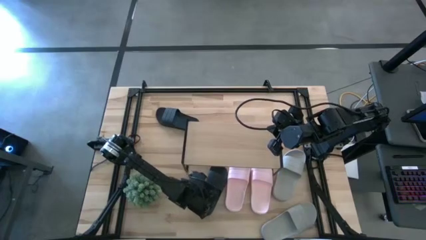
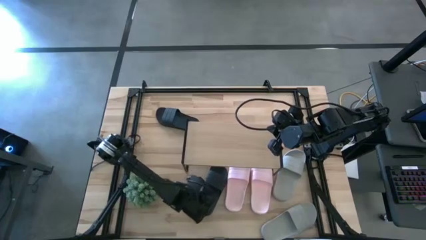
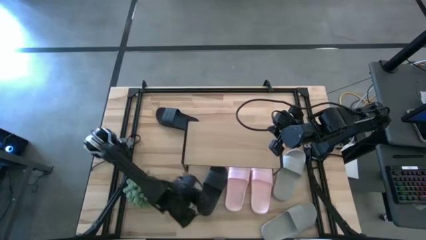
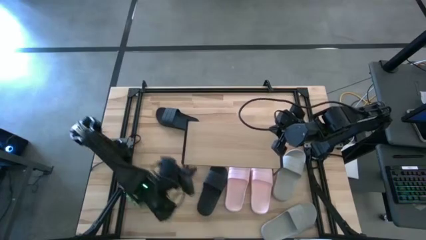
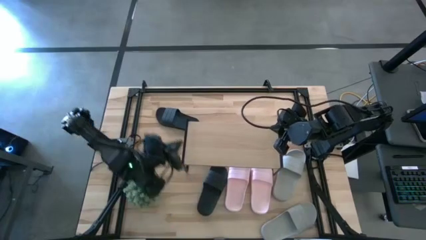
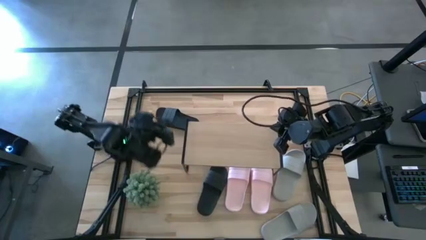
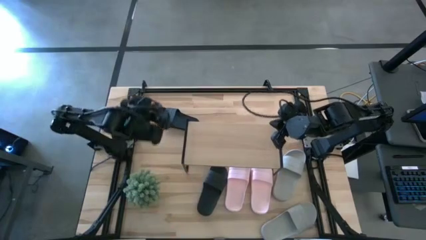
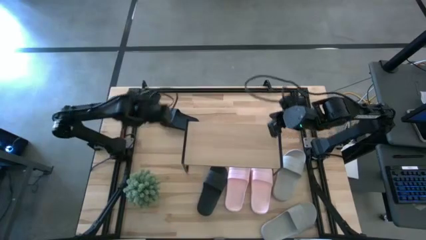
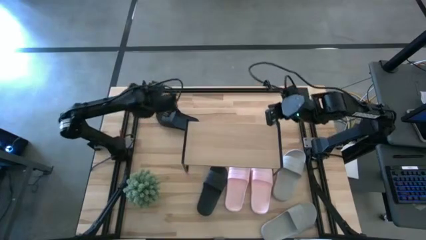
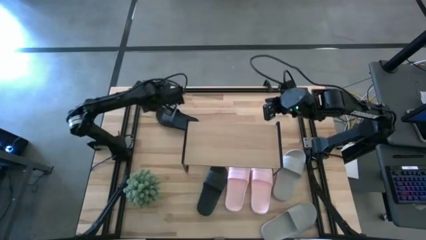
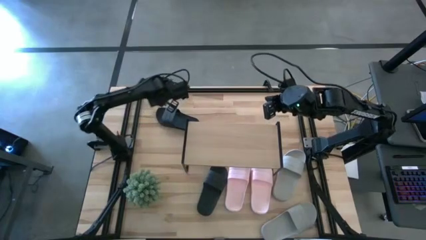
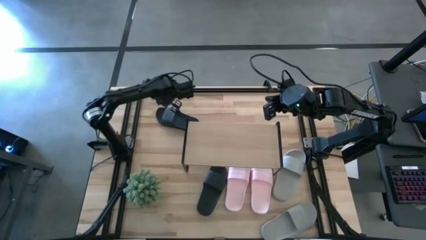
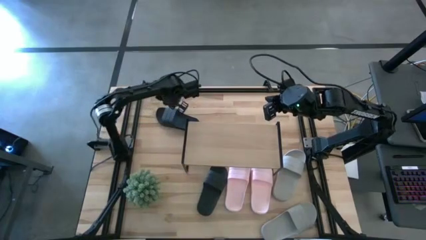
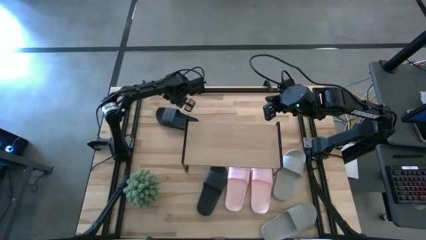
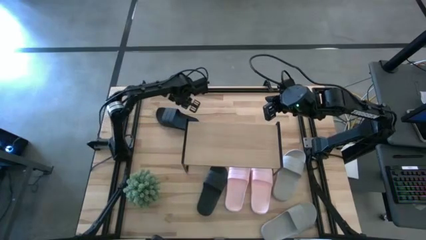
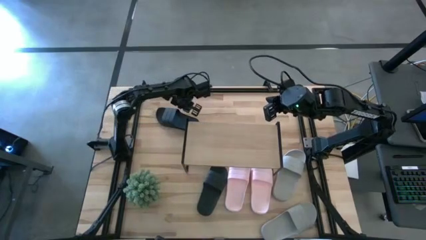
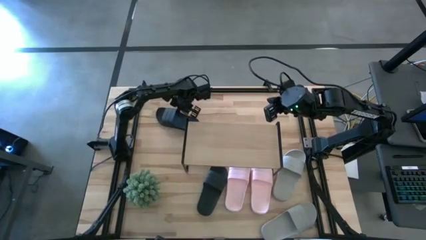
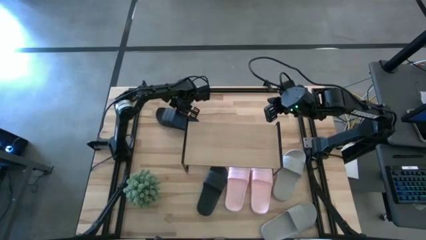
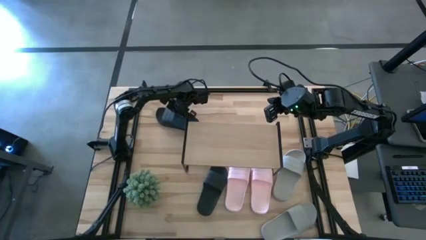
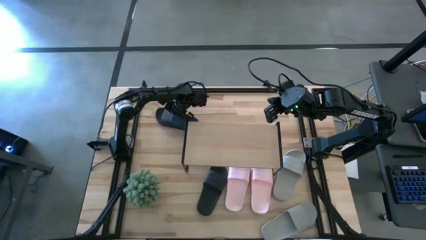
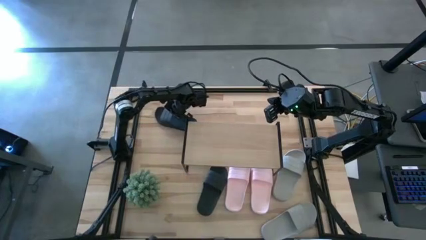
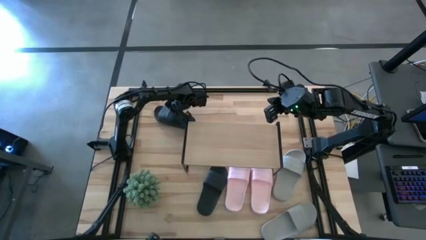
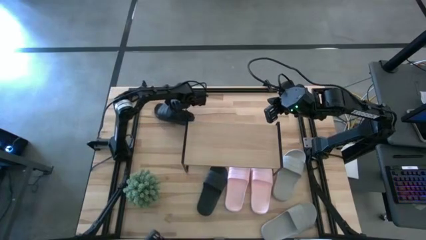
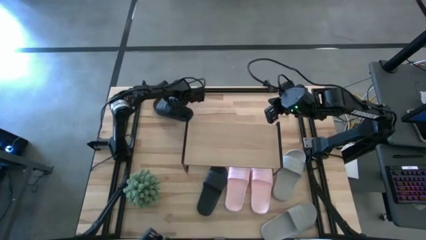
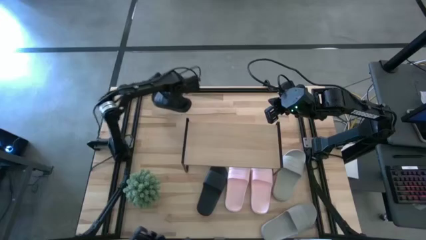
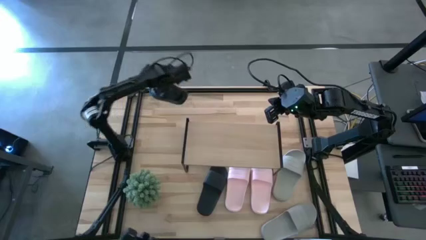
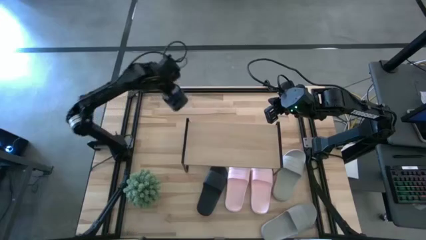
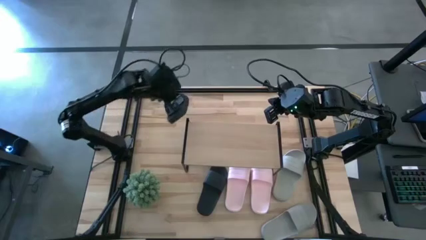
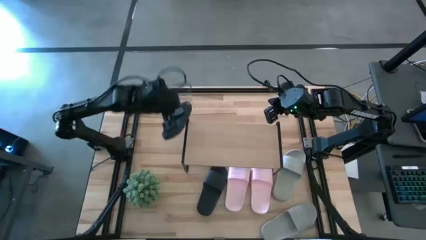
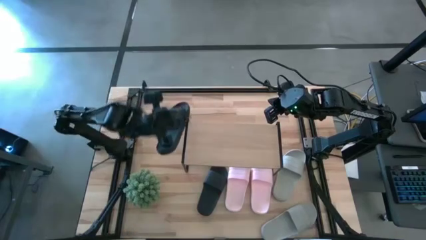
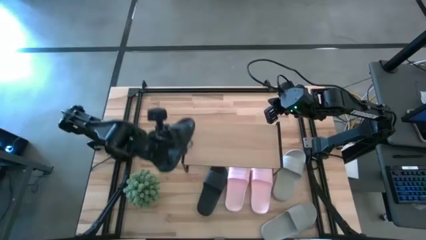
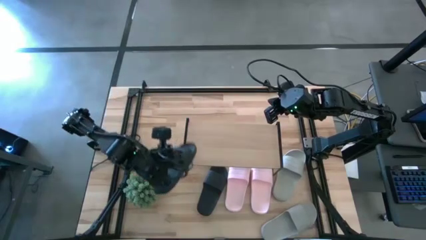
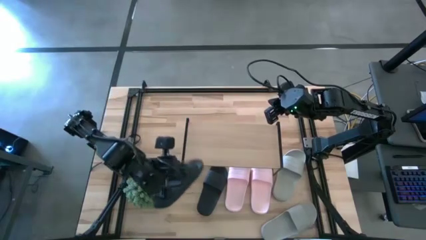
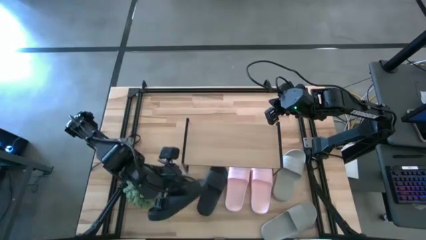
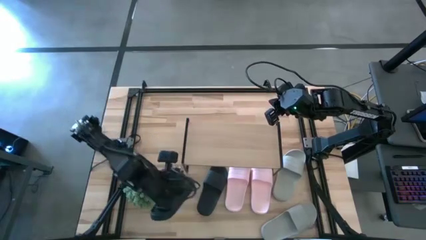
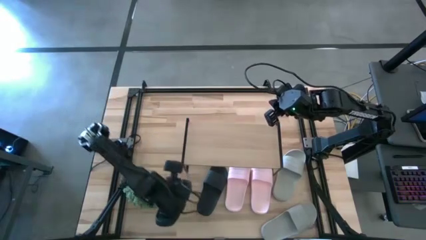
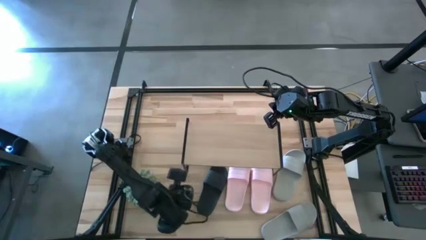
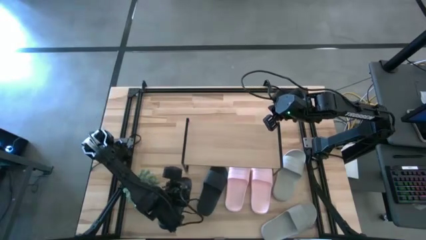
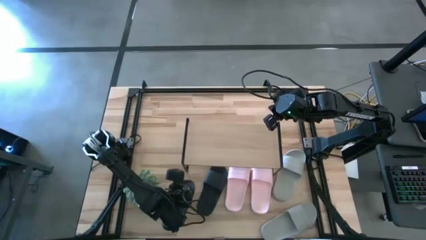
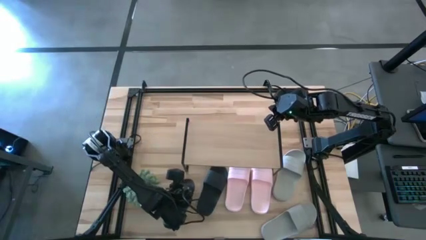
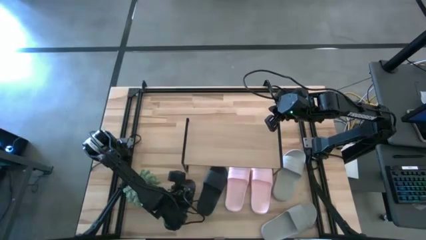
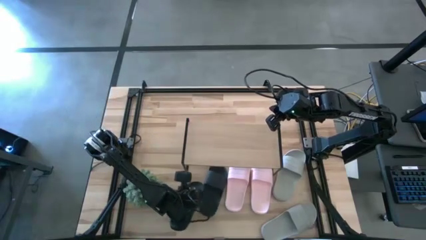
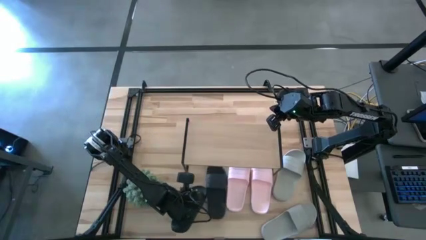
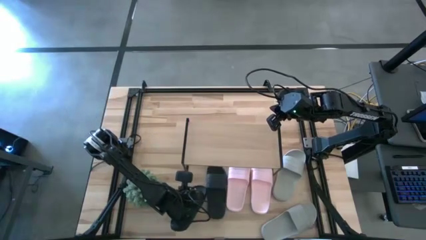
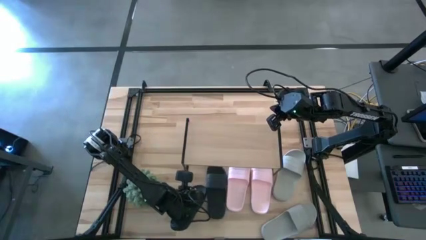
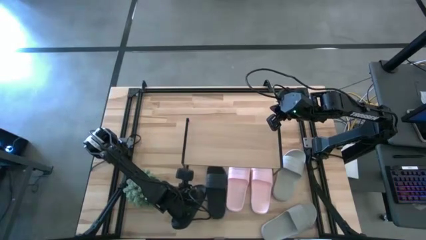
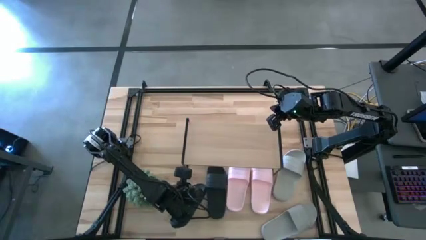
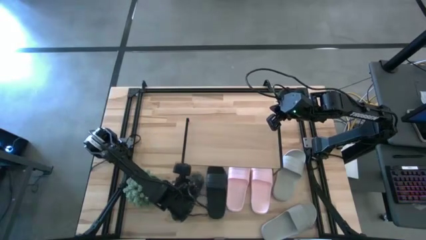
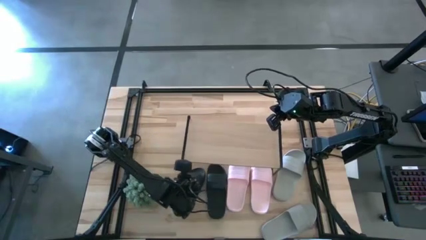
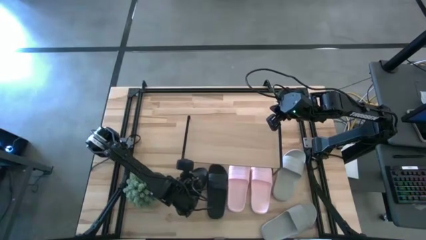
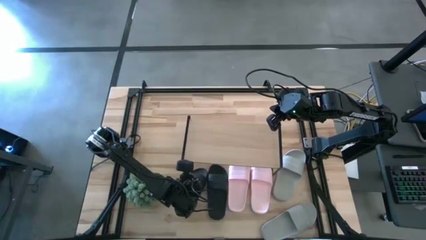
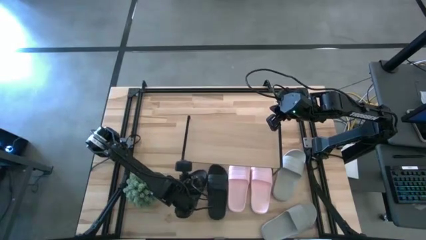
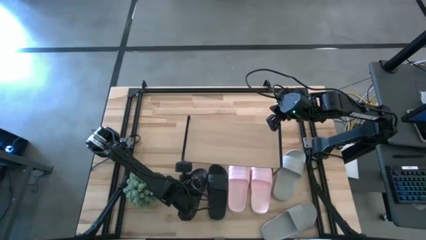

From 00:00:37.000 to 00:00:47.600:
Task: Pick and place slides into the shelf
Put the black slide under the shelf

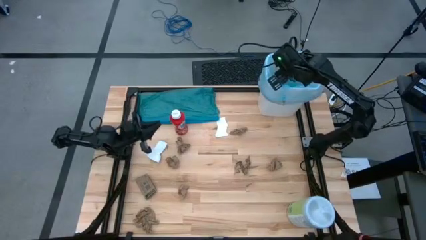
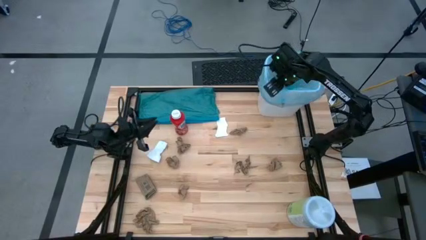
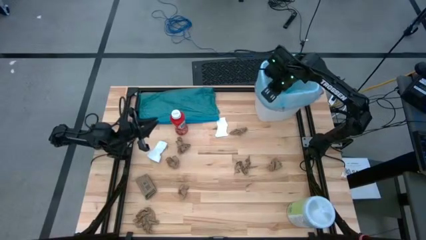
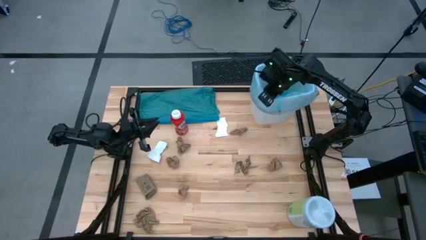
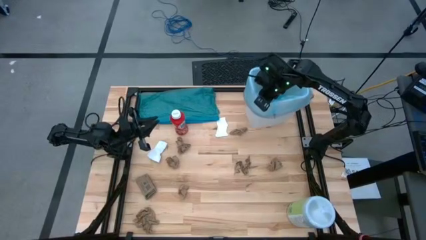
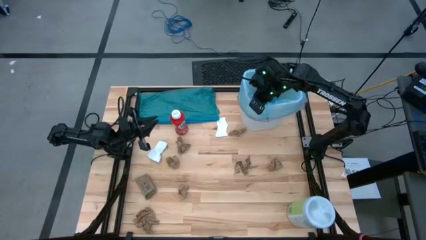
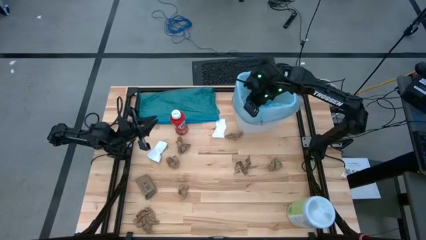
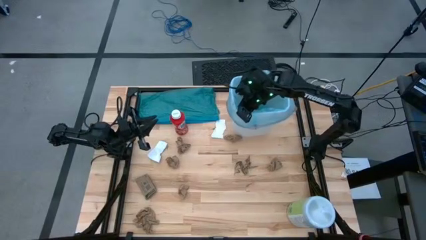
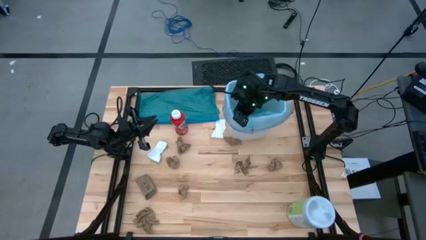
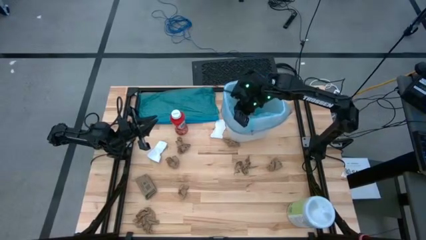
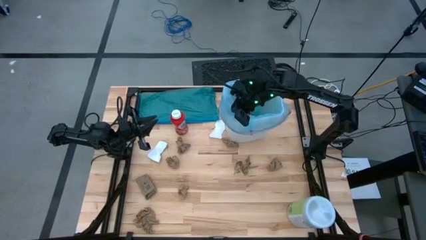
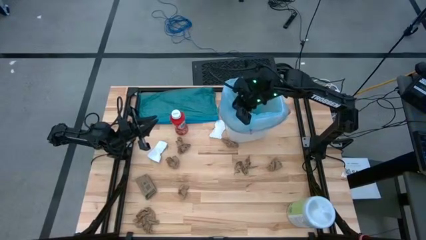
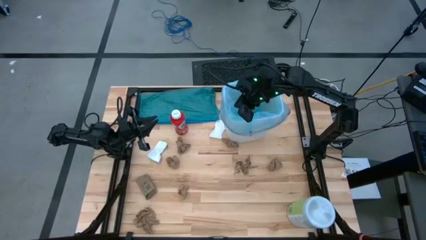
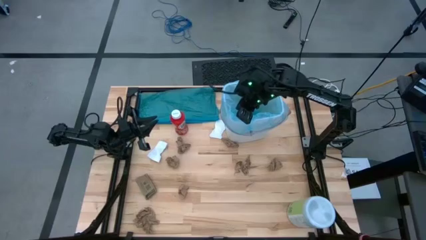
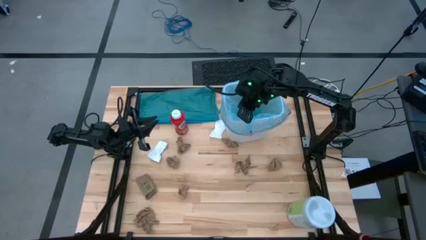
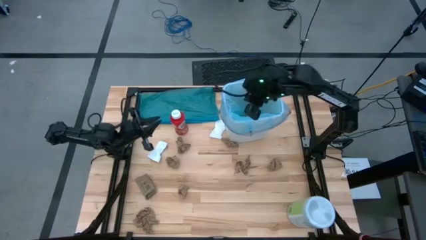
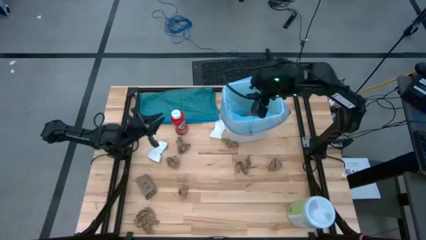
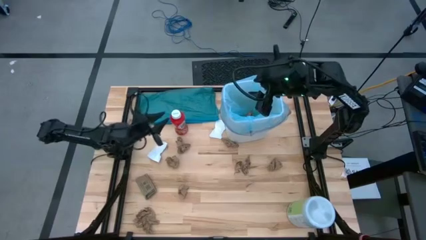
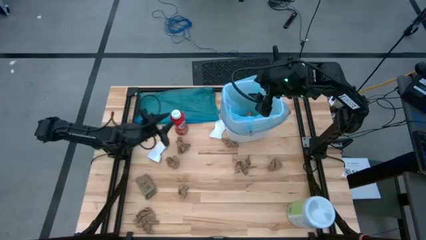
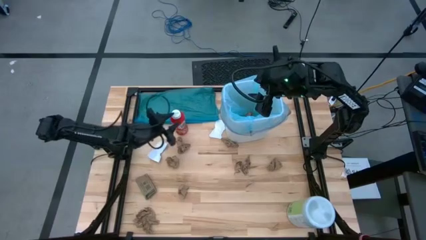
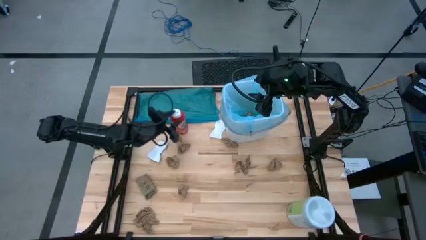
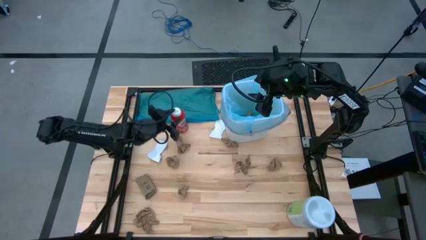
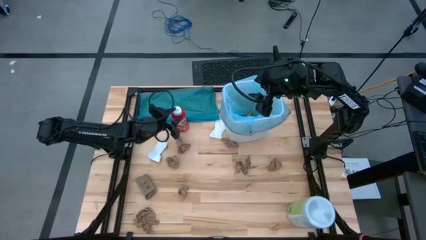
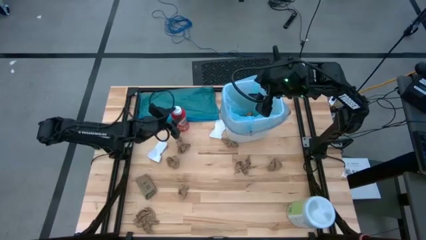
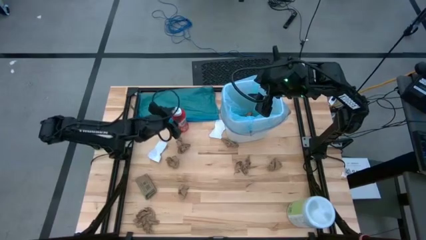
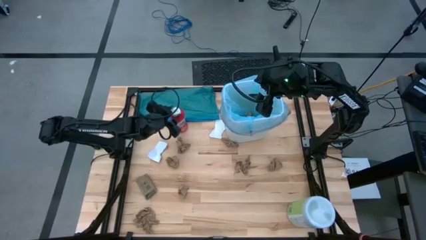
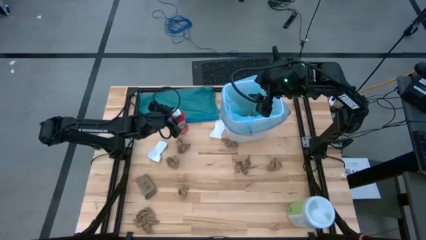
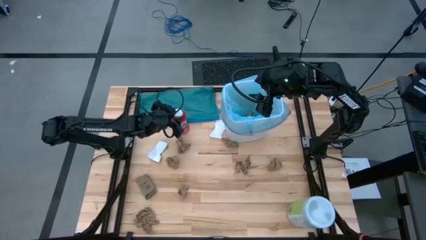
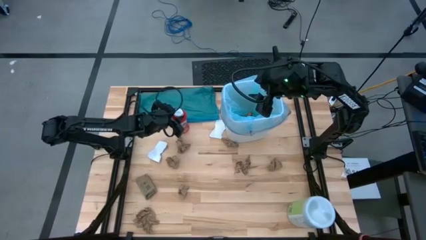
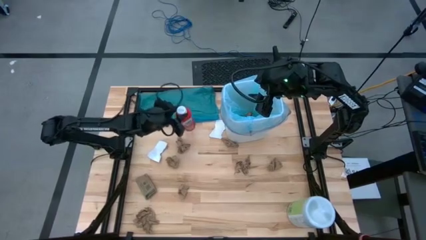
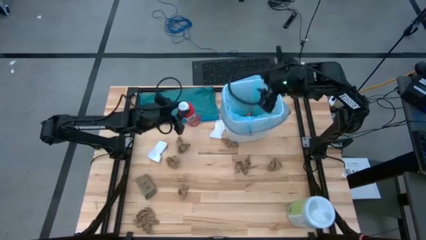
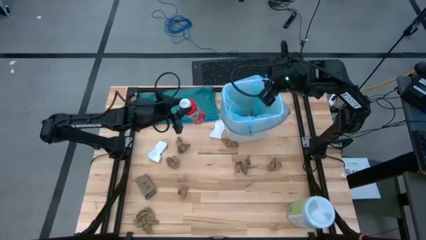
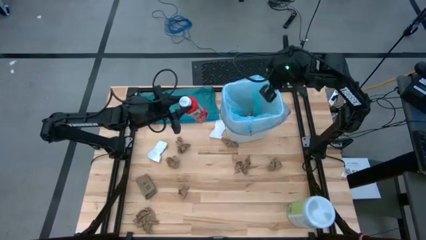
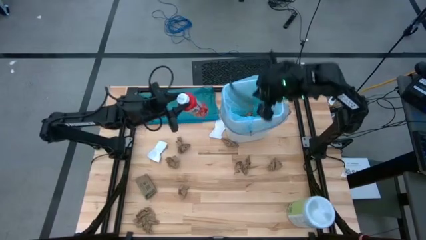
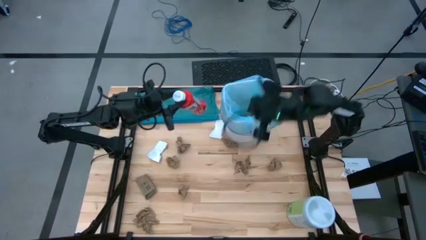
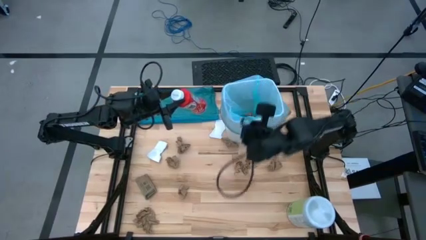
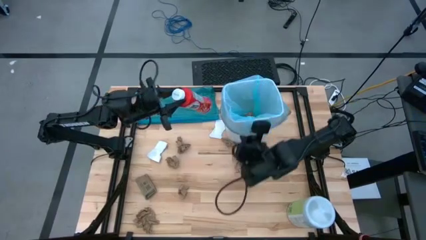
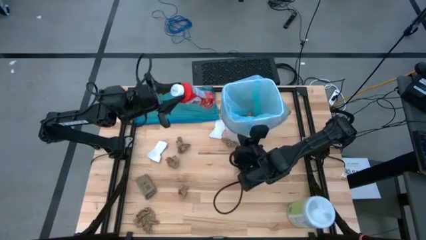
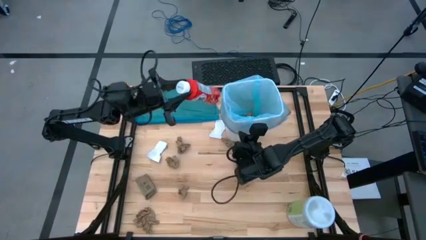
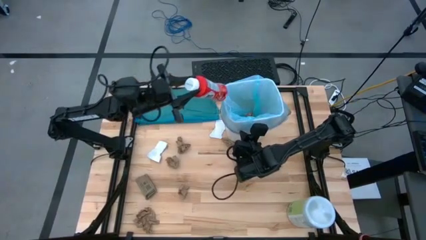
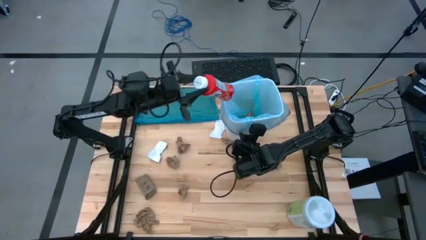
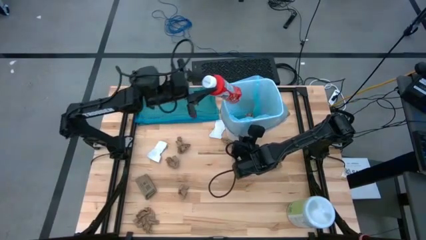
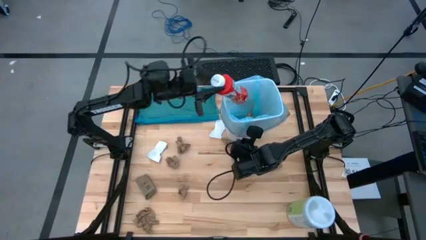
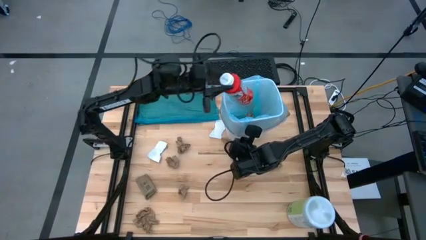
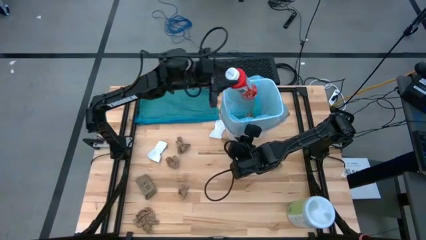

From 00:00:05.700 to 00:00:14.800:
Task: place trash/remove bag and relplace
Put the red bottle into the blue trash bin
